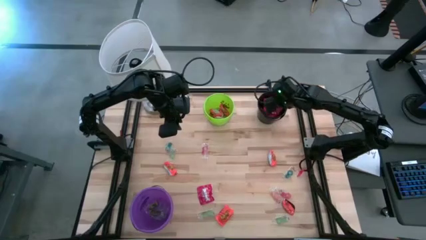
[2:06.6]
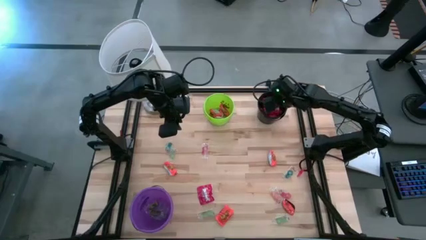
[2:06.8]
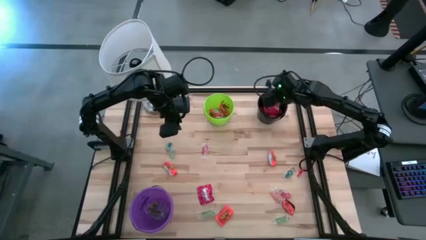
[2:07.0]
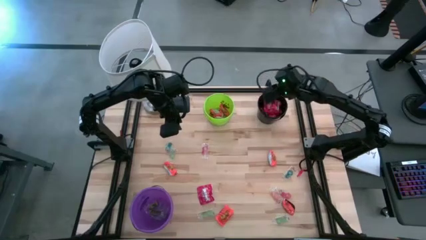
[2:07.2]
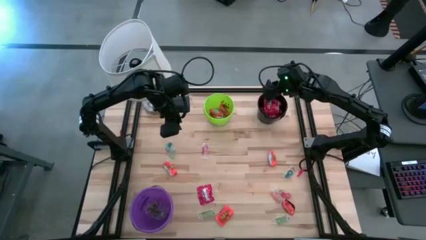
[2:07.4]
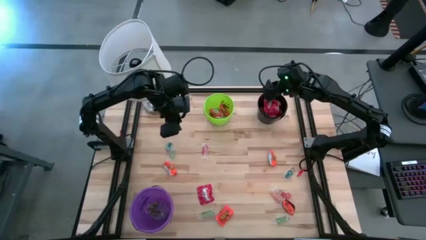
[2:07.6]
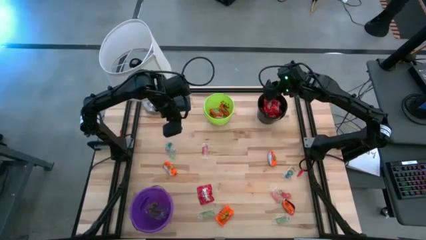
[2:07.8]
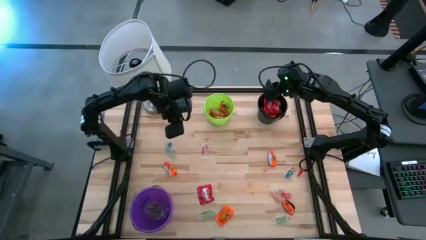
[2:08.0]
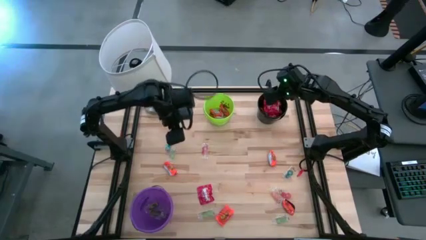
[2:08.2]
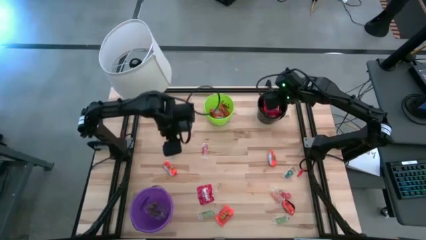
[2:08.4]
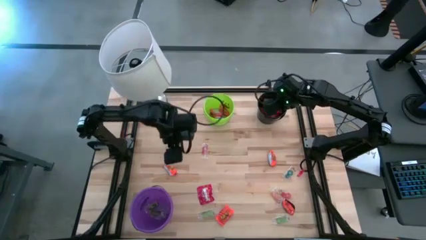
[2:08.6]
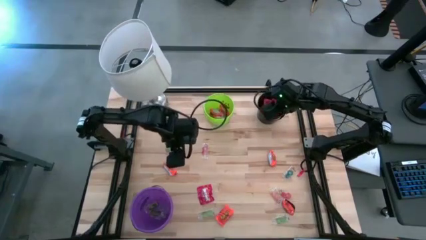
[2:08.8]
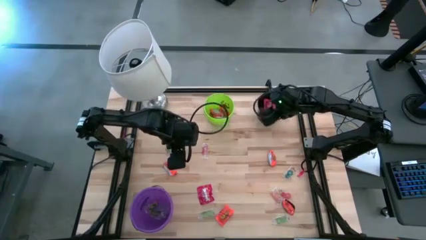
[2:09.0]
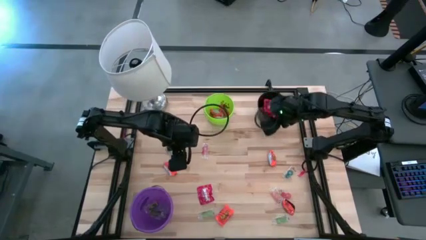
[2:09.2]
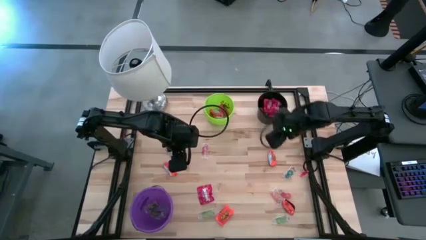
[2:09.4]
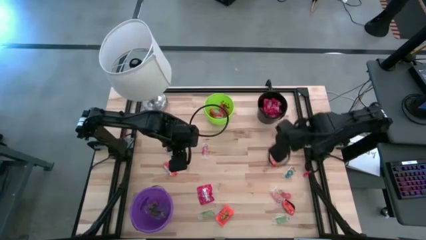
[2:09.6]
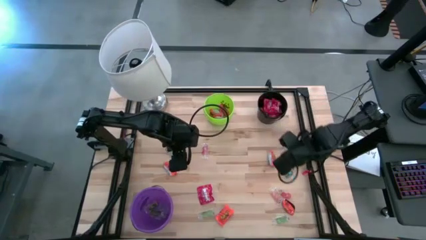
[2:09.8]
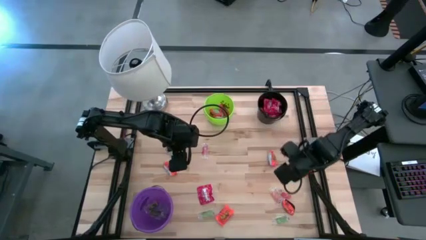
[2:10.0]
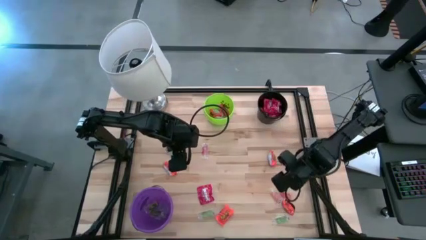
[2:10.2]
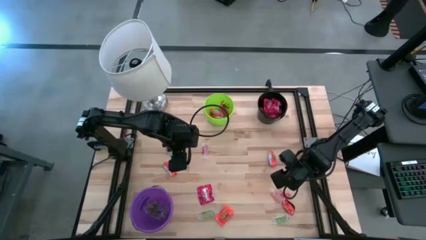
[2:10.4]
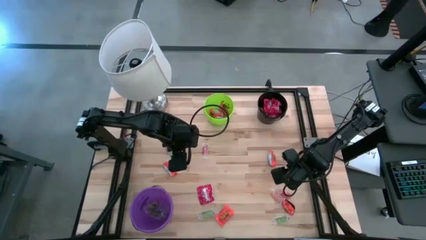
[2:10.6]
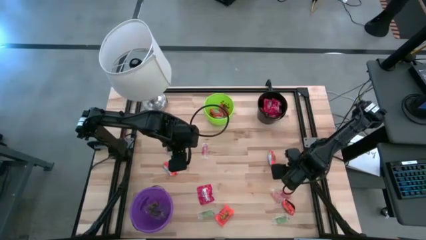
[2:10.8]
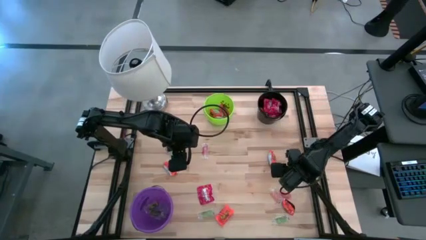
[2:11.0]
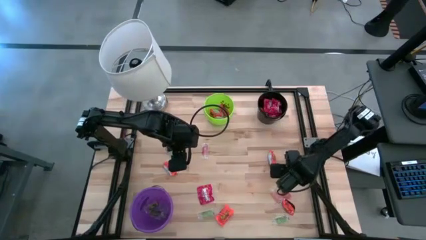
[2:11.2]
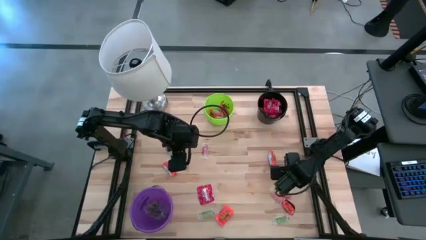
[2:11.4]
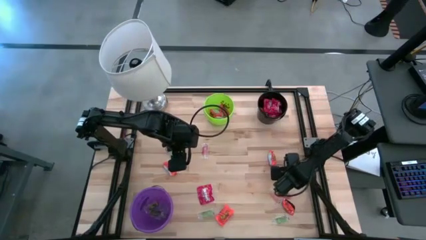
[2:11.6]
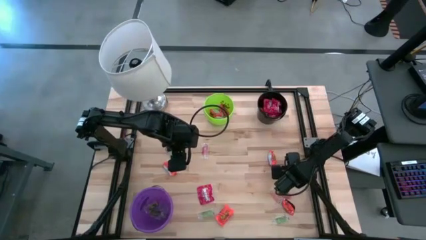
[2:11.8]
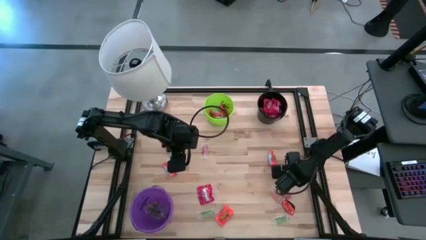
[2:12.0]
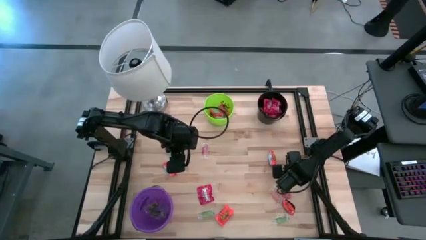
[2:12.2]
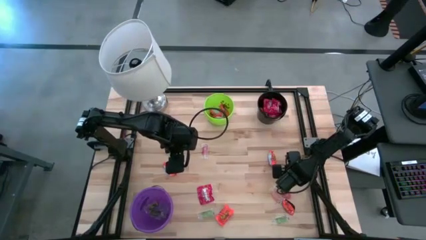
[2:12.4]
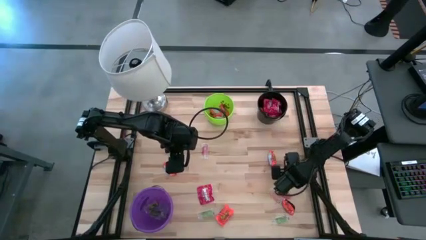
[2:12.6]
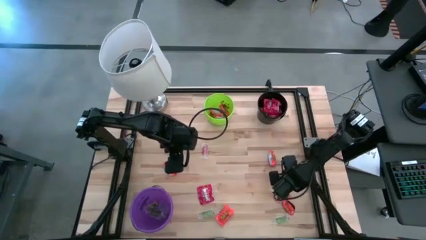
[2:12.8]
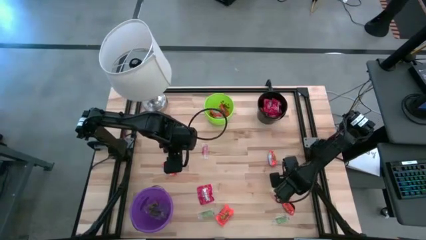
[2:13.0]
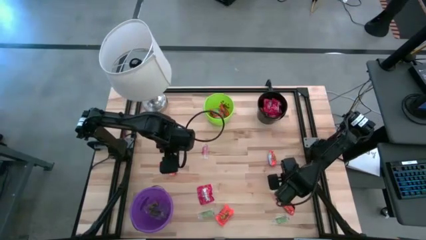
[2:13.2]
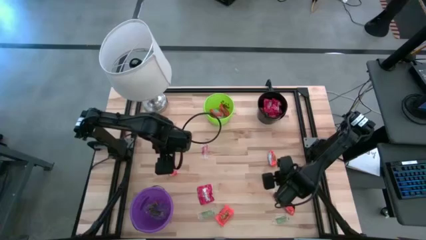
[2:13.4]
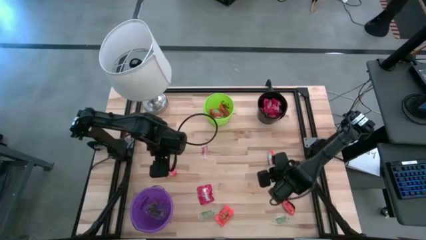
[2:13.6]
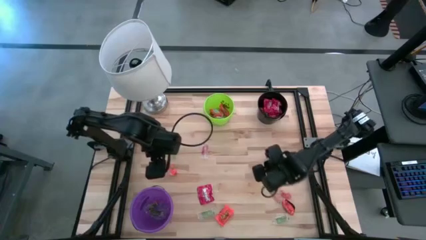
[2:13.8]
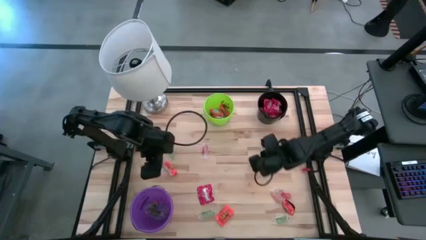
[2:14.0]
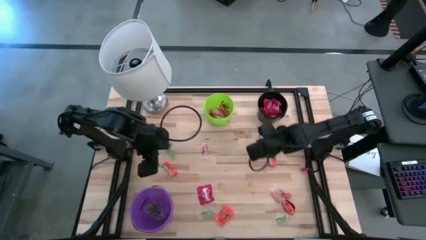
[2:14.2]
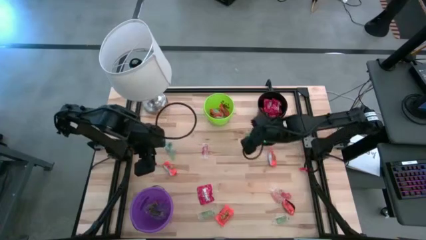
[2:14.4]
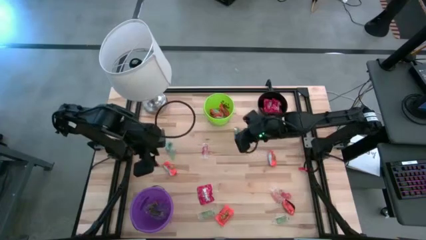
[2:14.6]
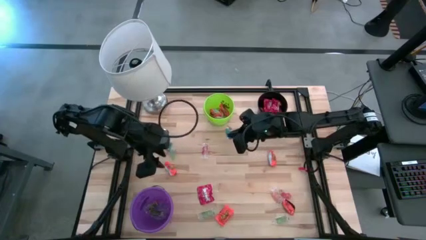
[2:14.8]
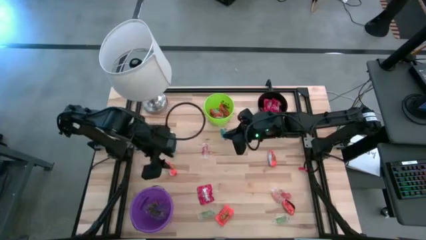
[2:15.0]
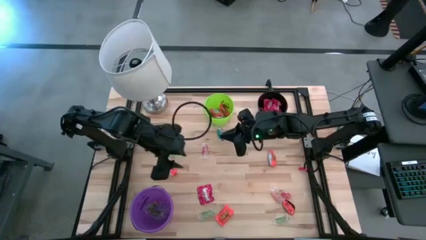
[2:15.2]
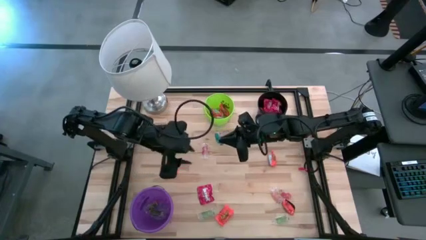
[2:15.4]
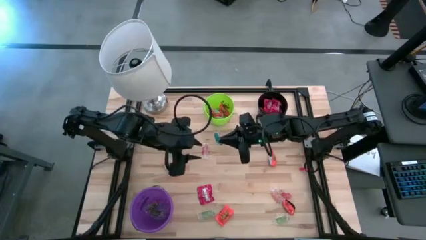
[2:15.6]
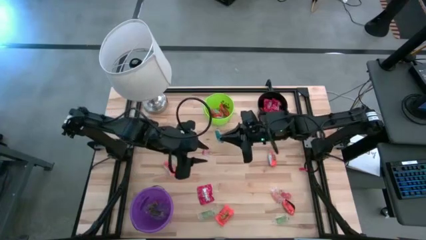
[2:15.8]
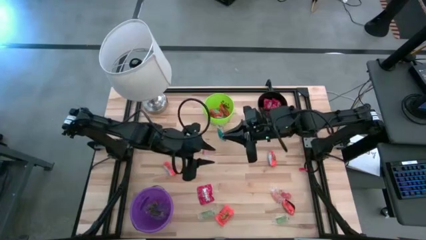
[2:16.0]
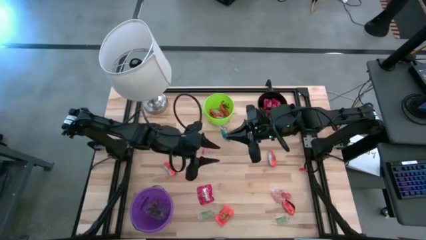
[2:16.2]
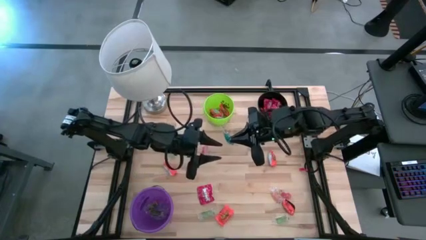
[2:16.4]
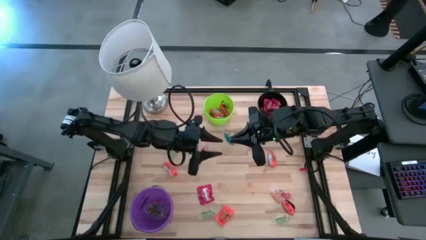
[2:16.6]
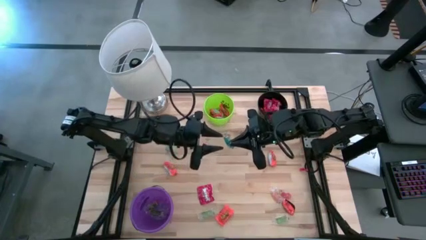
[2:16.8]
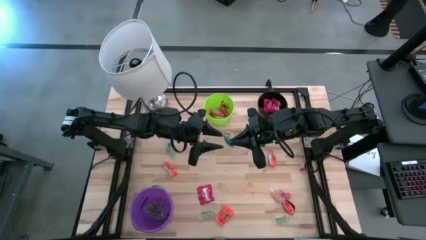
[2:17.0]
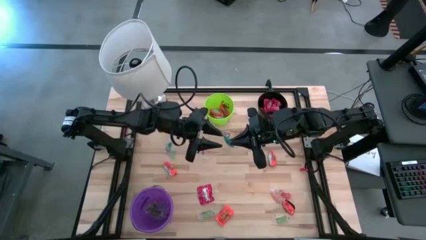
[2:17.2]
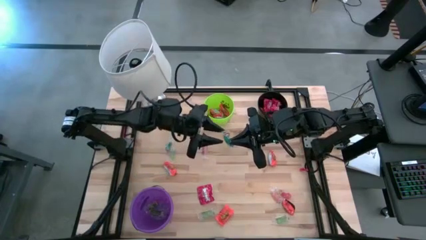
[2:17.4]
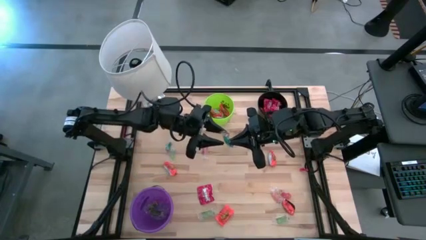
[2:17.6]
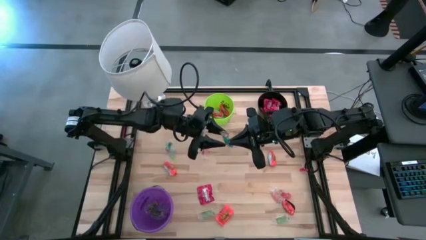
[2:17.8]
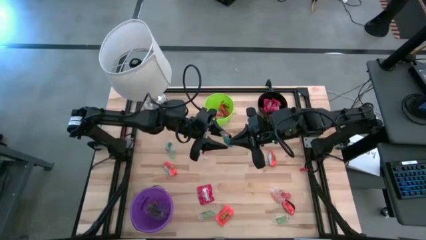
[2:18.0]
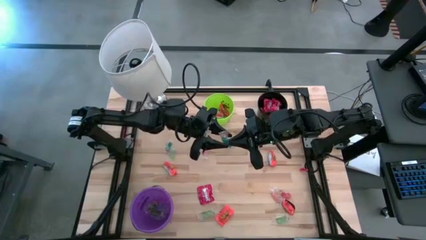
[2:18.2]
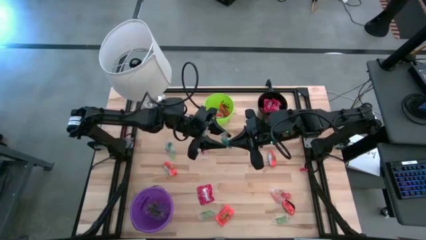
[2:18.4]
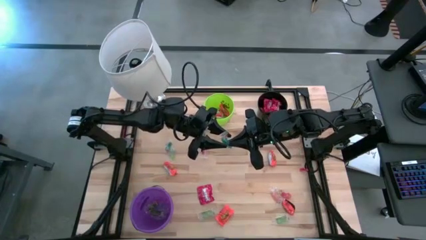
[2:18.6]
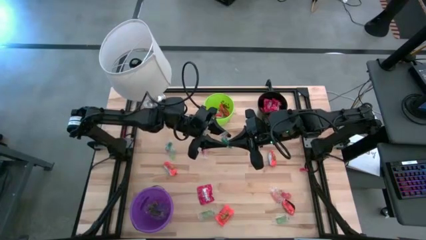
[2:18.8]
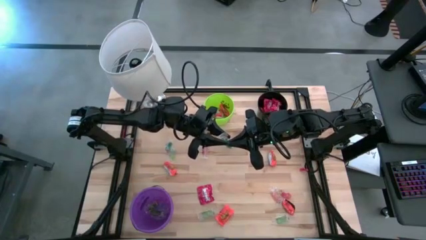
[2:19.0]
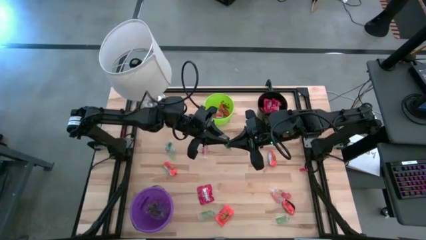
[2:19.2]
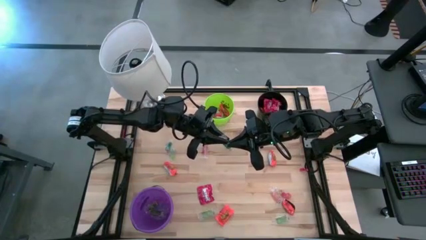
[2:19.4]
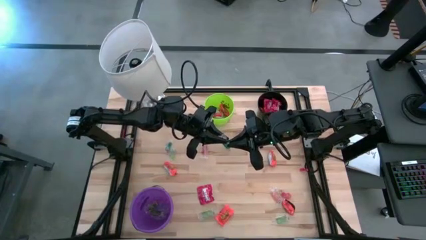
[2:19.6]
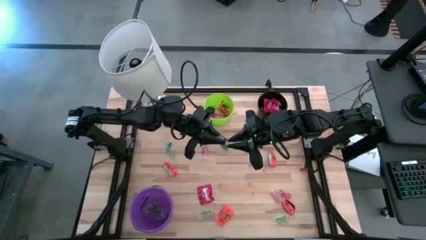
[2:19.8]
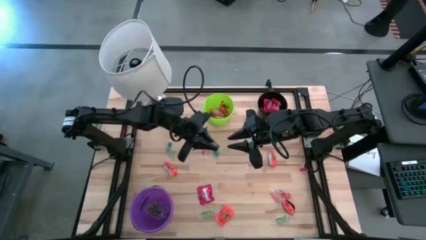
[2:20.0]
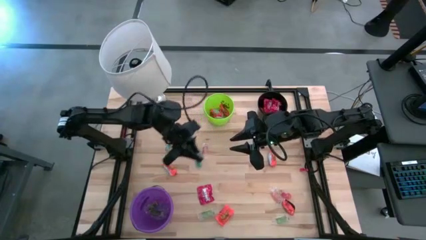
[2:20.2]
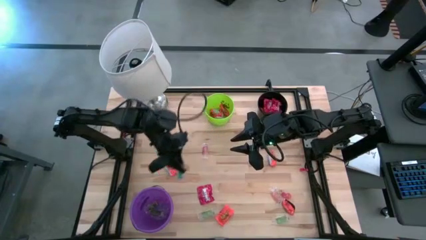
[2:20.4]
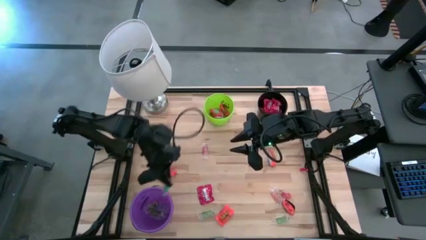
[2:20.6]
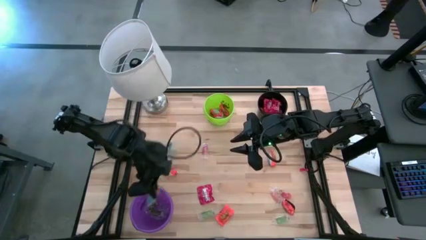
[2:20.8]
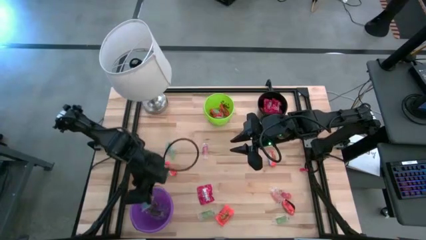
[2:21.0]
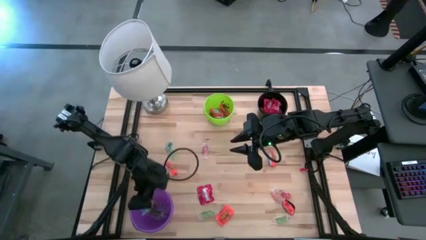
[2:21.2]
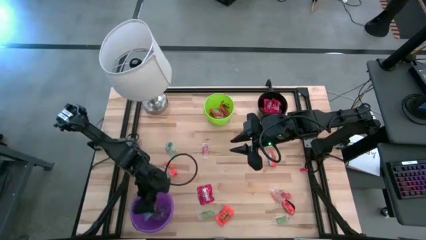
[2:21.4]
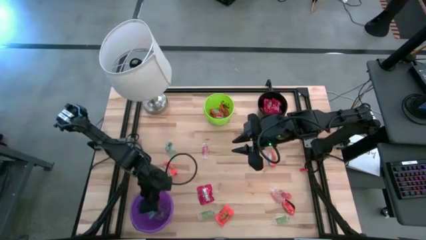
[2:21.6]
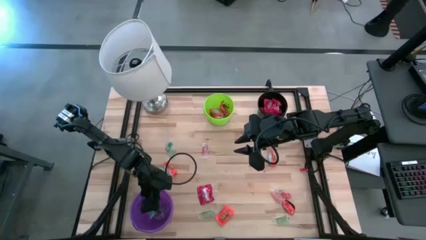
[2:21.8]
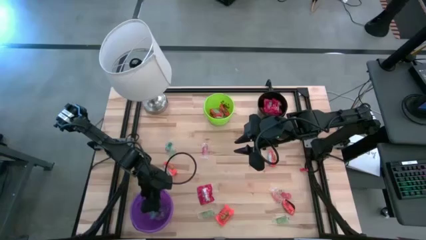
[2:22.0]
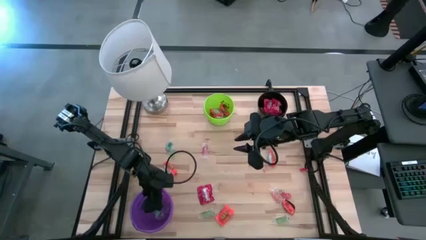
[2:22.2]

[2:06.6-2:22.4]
Task: Sort candy
Put the blue gummy into violet bucket

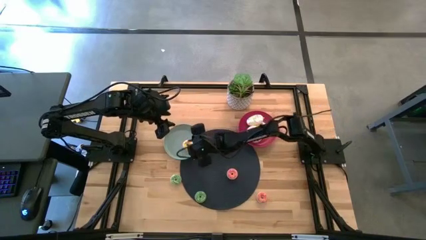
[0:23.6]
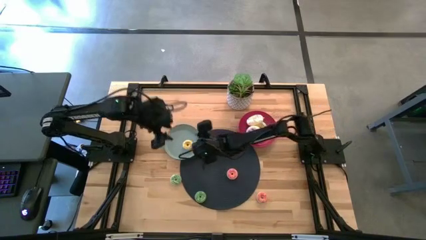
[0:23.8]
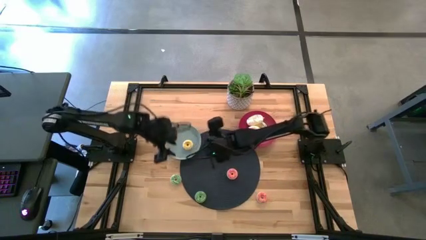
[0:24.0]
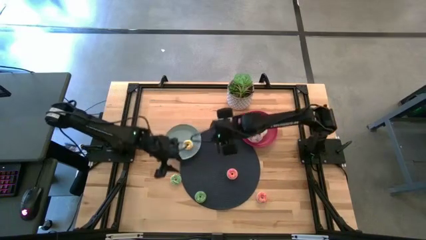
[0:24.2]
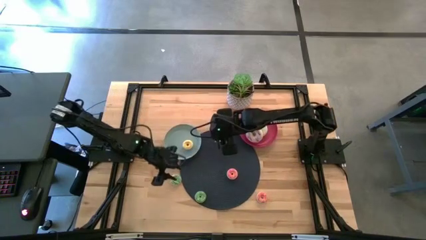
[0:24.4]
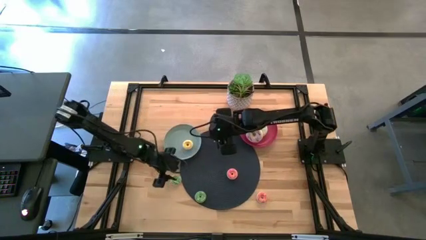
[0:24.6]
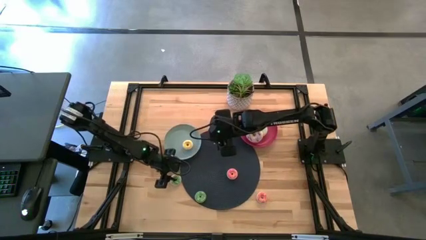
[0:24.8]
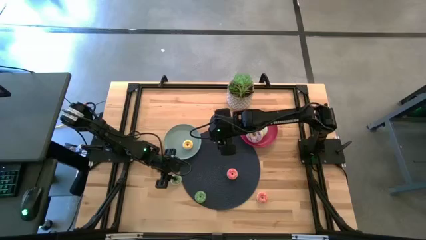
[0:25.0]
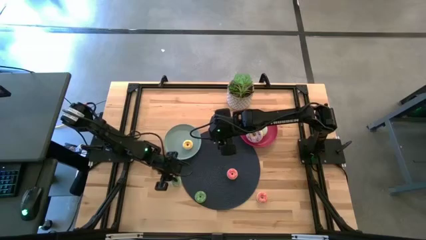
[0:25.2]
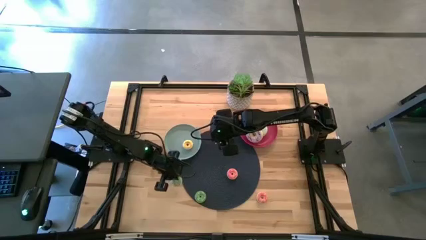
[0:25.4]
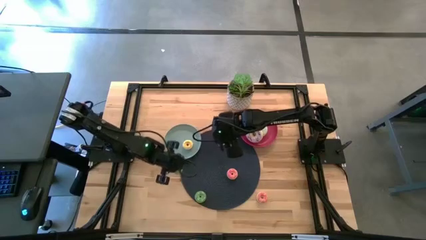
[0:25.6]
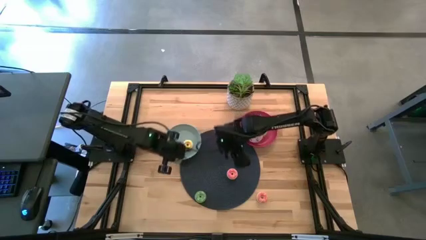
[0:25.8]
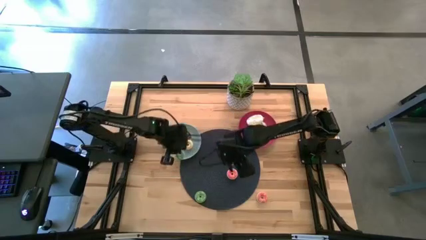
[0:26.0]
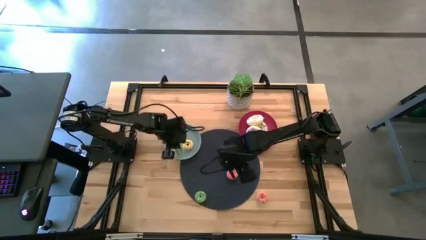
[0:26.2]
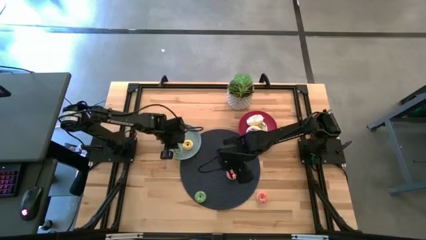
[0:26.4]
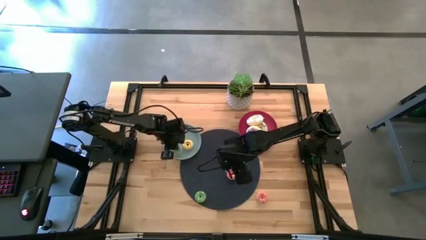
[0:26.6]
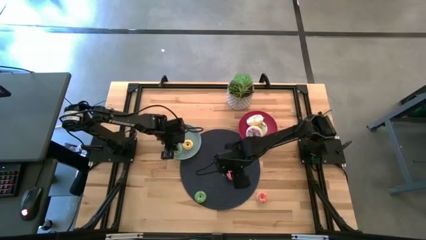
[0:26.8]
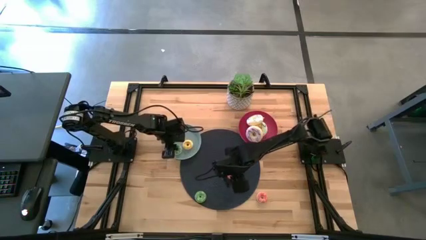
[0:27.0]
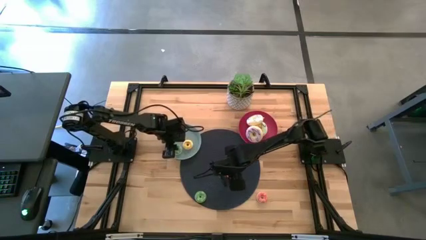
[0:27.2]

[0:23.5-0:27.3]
Task: Pick & Place donuts
Put the left small green doughnut on the blue plate
